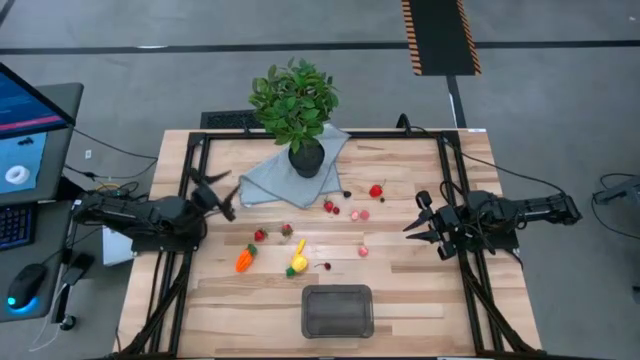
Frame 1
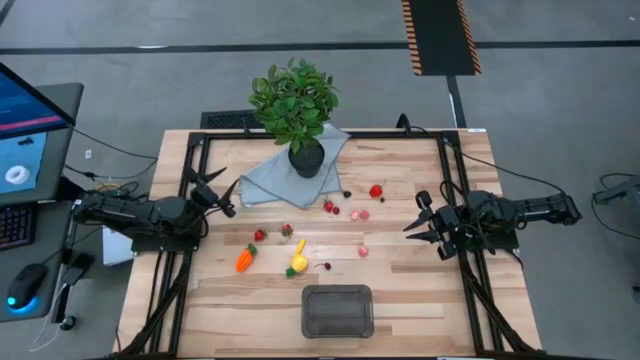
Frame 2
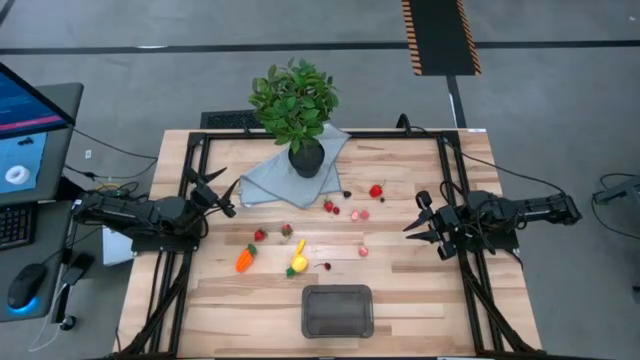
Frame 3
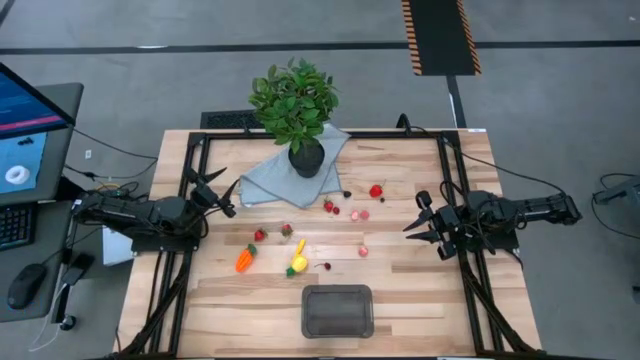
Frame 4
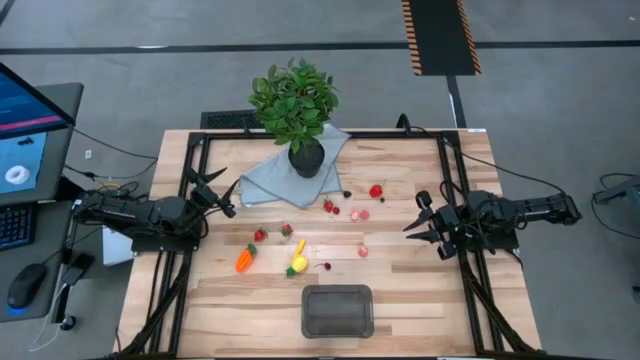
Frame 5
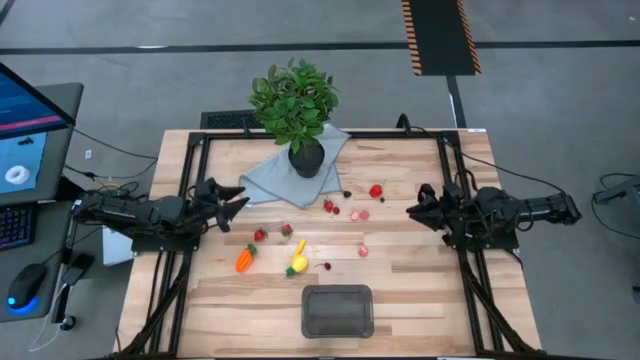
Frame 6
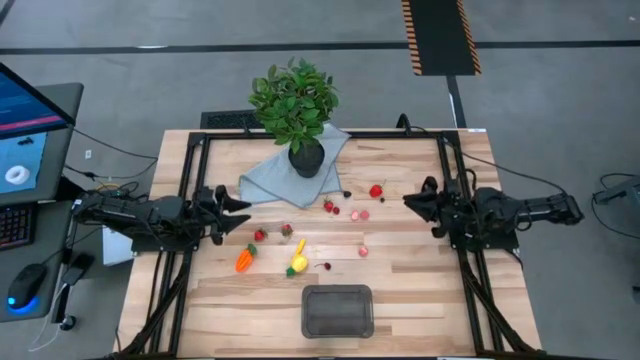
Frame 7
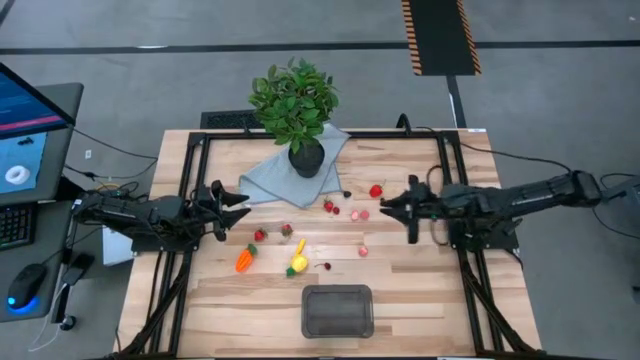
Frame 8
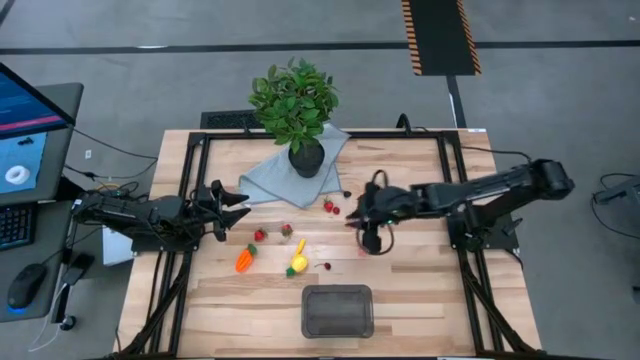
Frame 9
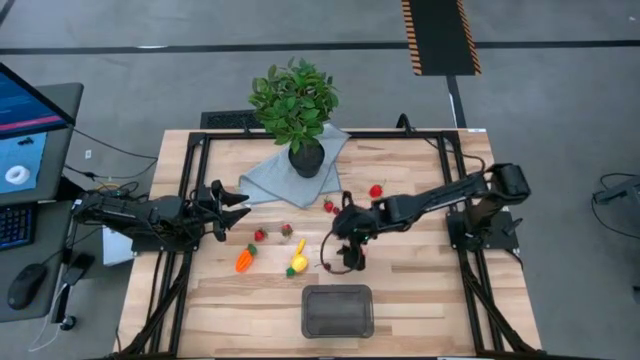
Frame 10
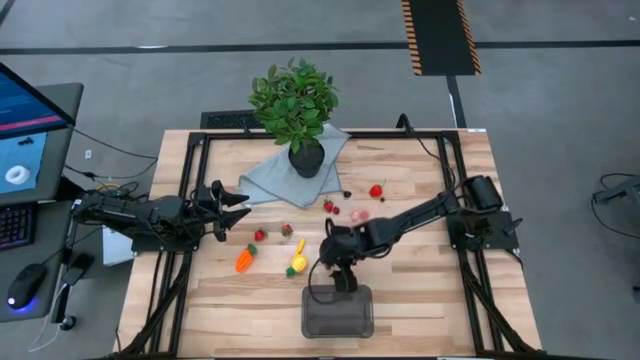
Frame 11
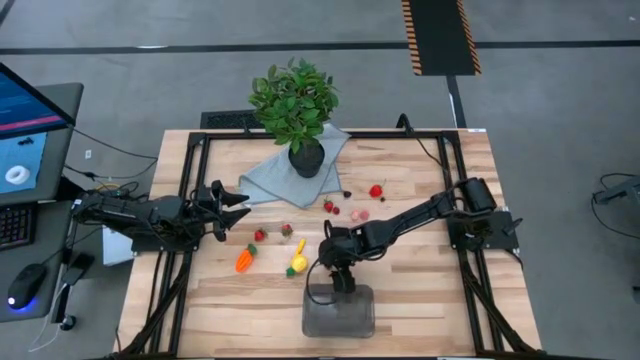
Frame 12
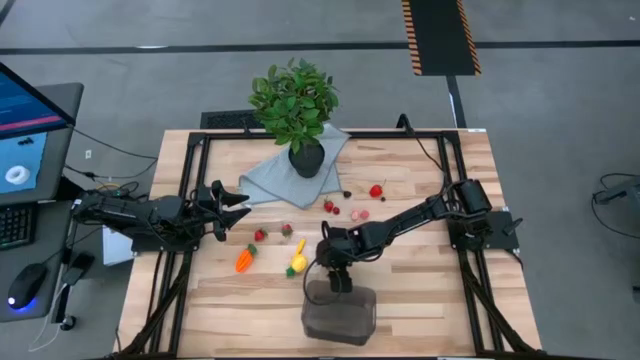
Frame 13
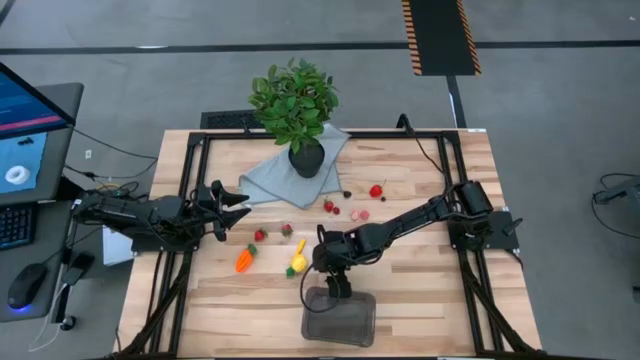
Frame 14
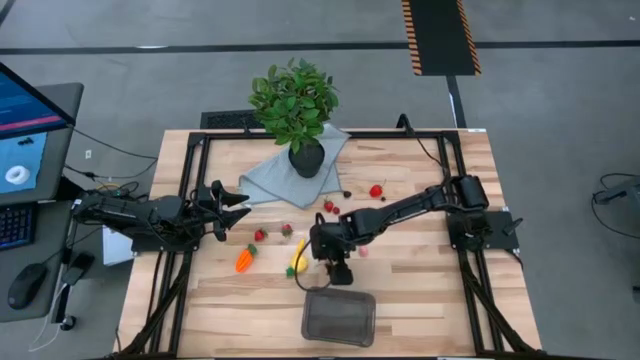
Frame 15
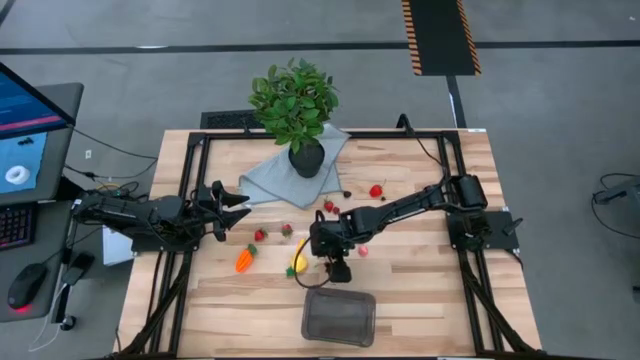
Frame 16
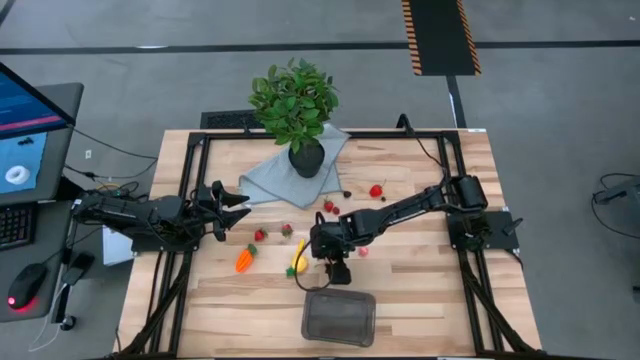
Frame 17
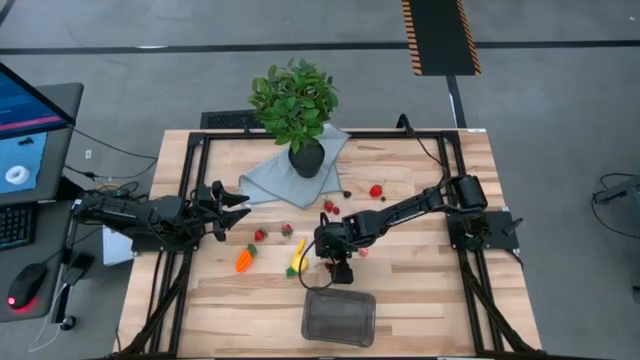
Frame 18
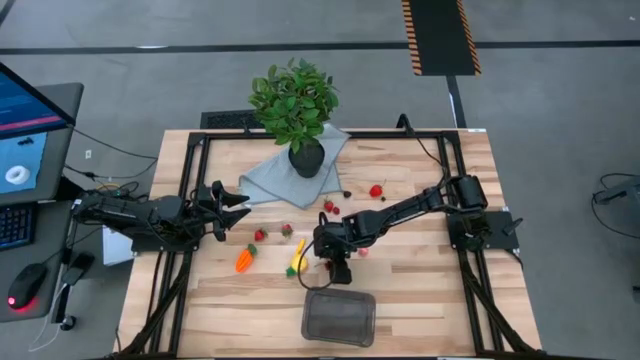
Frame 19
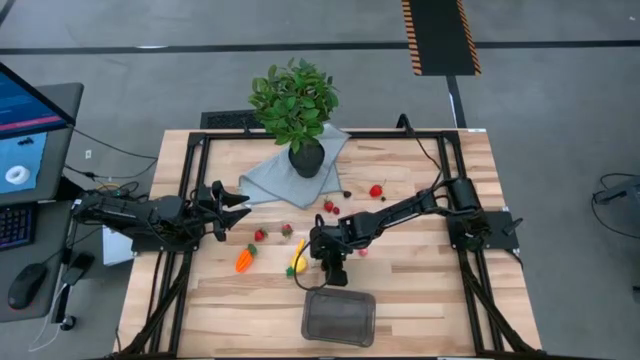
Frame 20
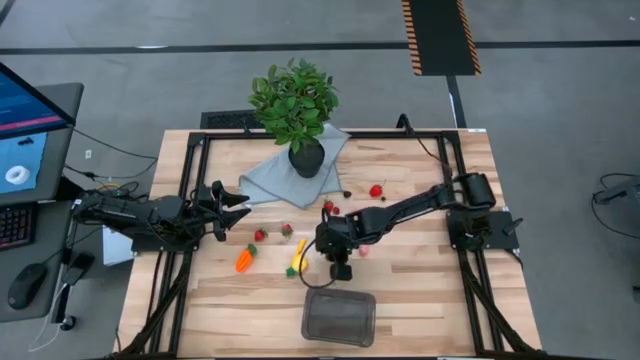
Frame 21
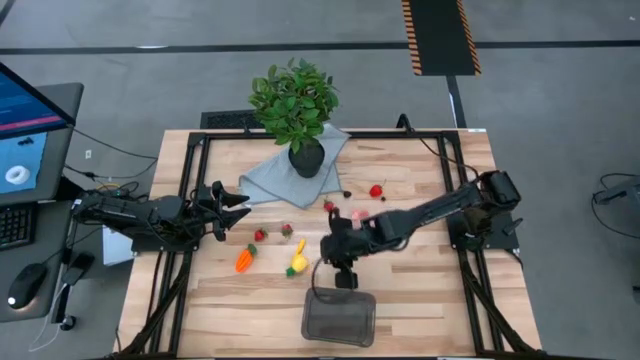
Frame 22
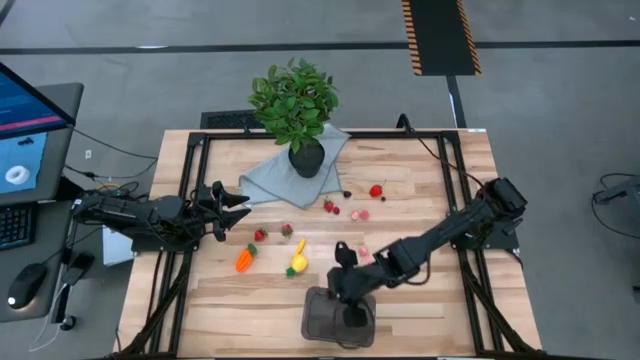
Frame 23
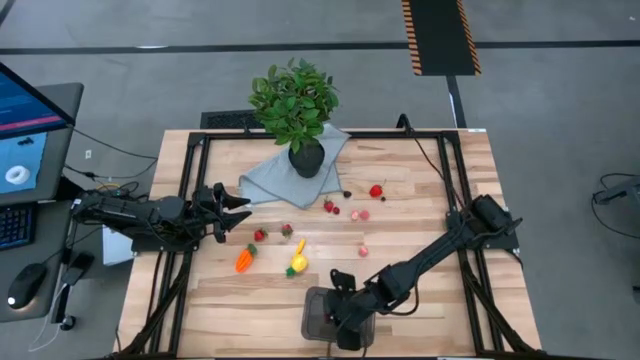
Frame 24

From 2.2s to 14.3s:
Task: Pick and placing Produce into tupperware
Put the red cherry into the black bin

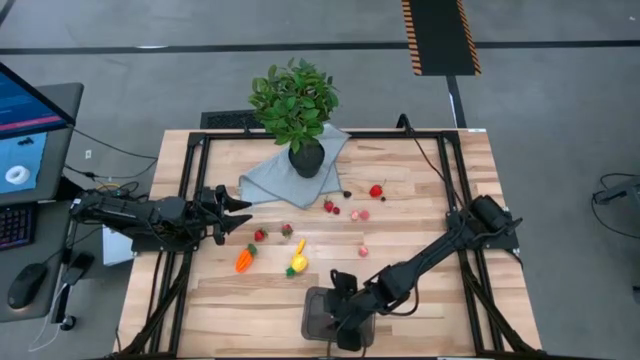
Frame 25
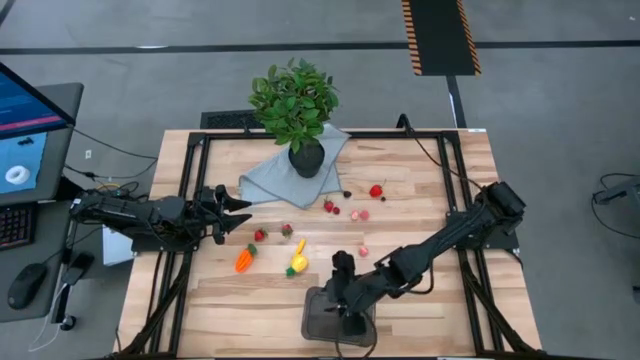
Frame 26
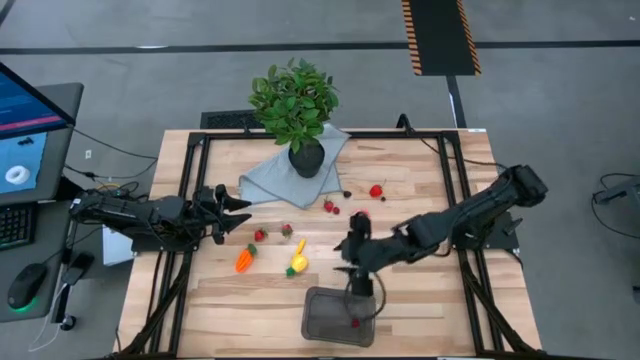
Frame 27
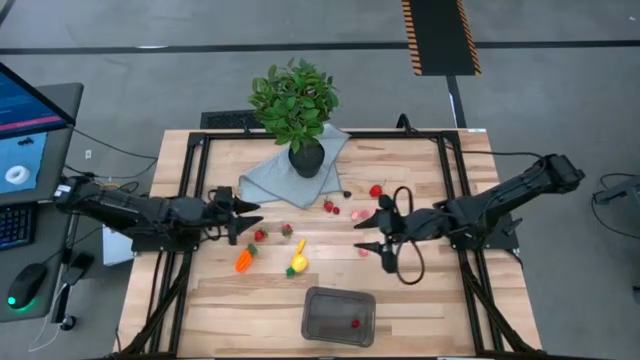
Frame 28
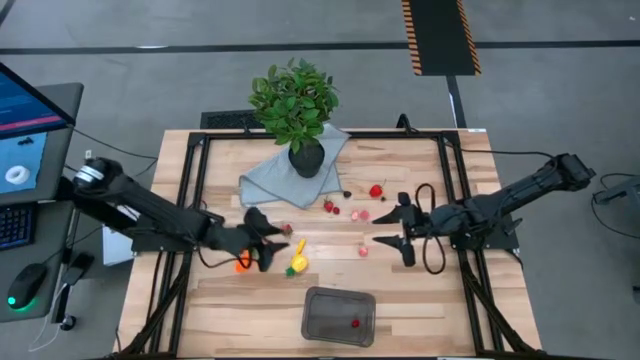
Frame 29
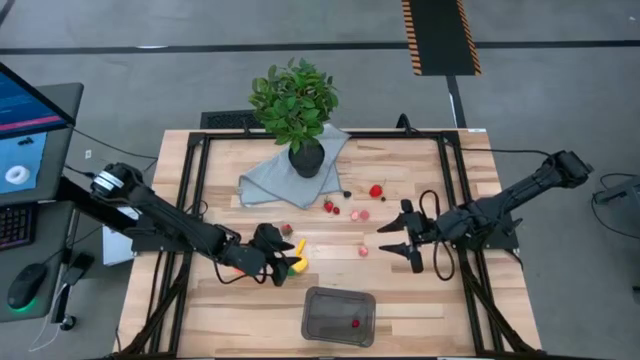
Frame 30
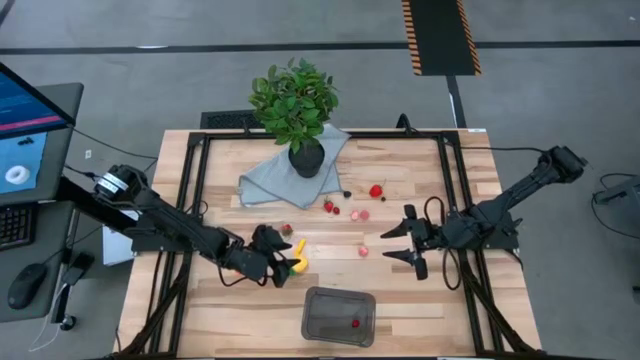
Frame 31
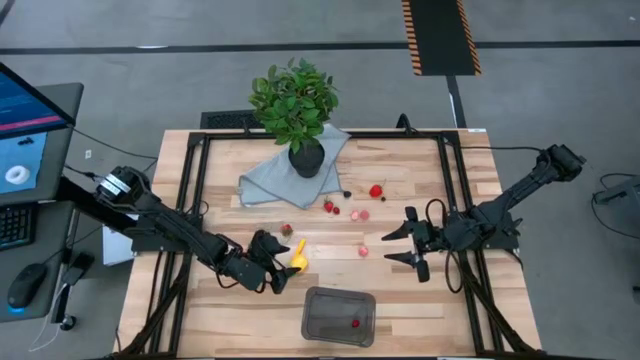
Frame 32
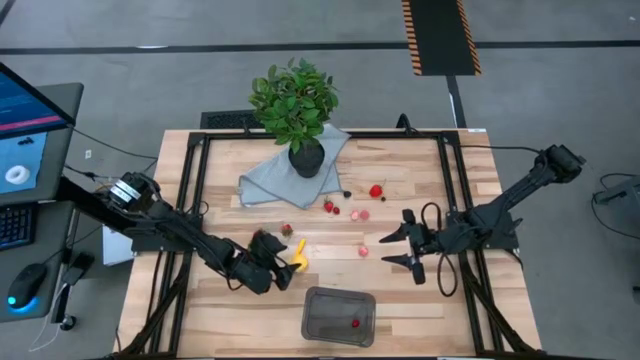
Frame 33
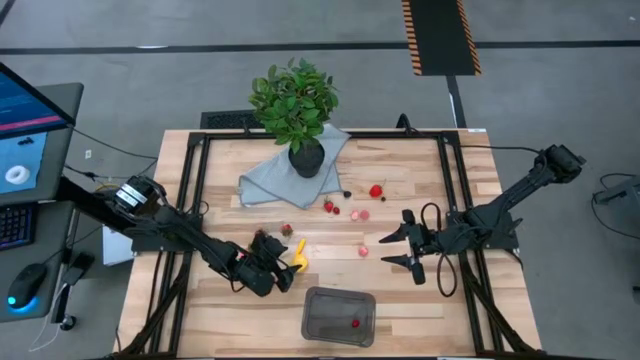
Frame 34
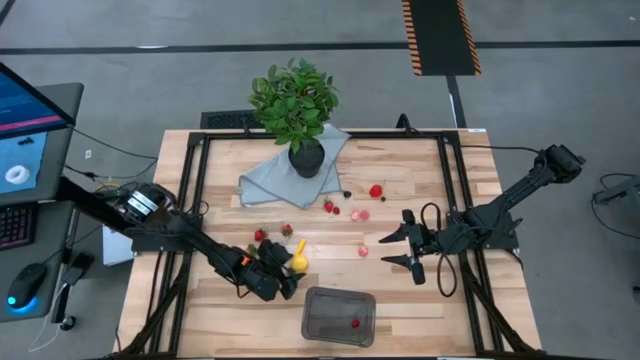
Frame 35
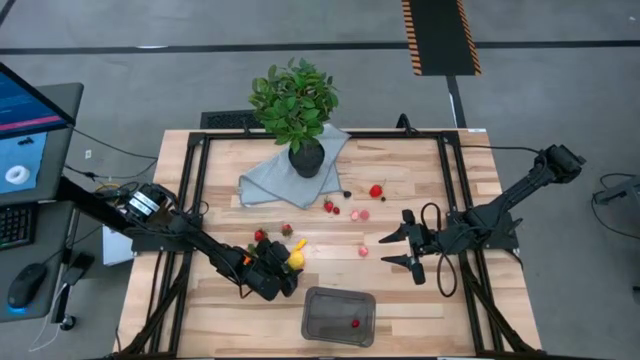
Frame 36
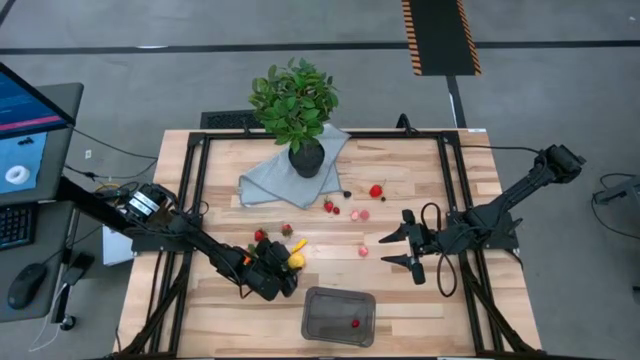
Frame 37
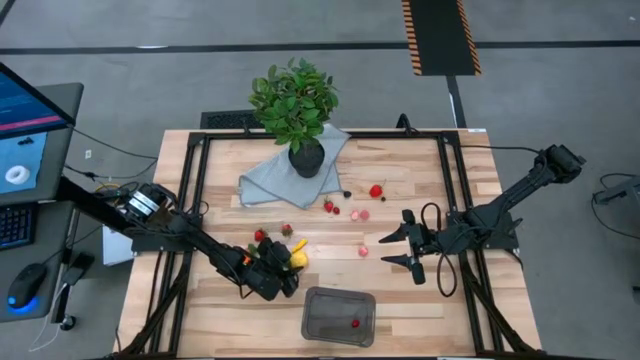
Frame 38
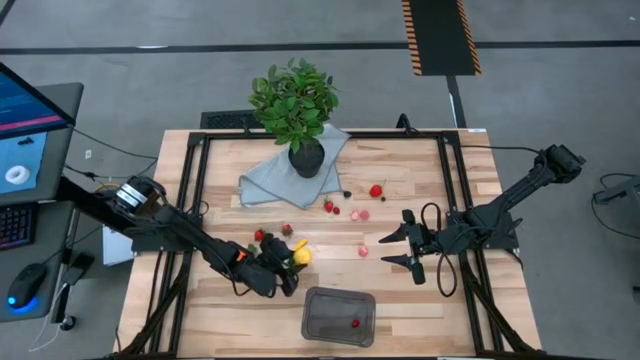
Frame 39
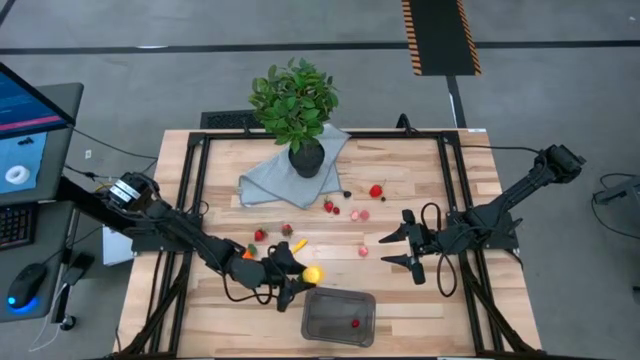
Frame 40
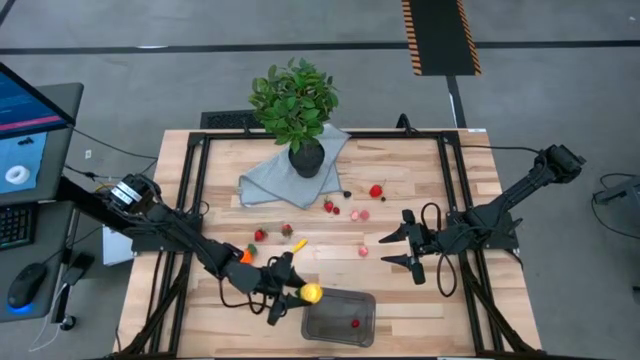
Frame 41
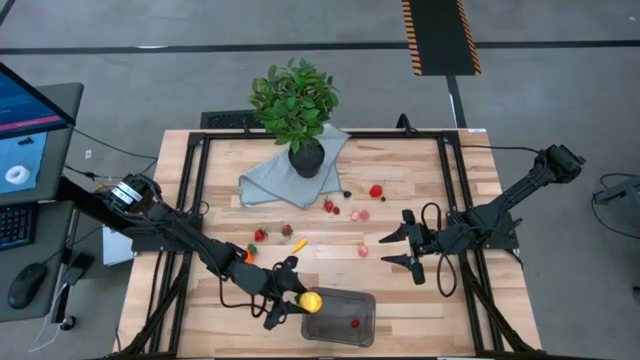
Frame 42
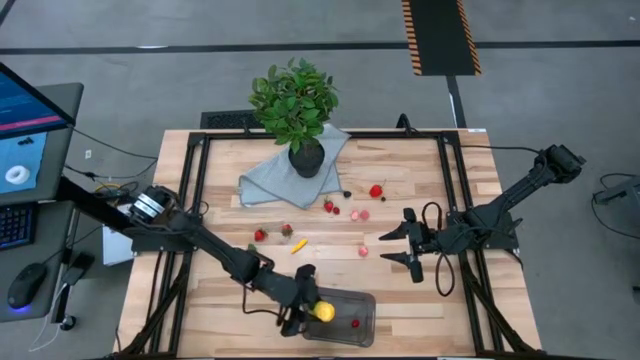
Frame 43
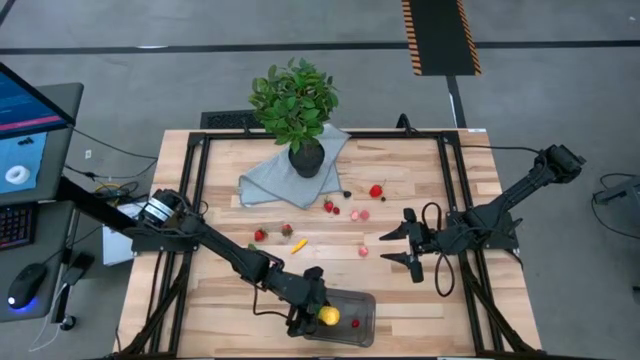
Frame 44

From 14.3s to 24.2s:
Put the yellow pineapple into the black bin
